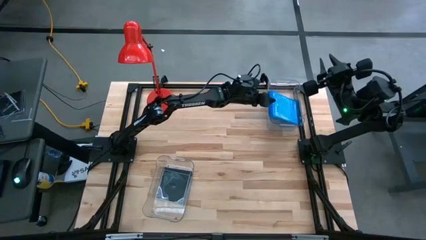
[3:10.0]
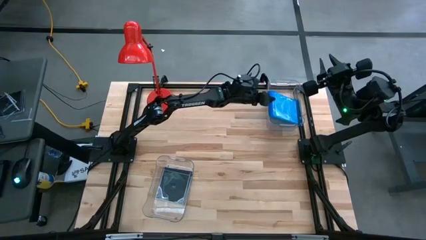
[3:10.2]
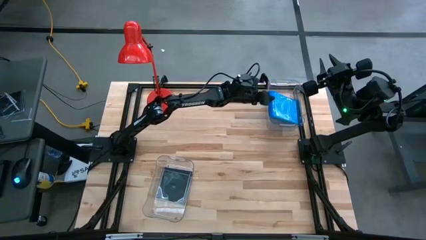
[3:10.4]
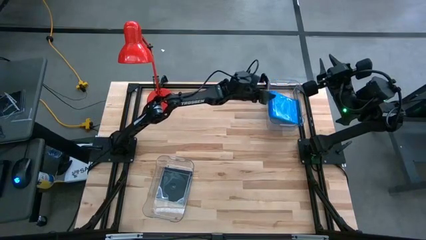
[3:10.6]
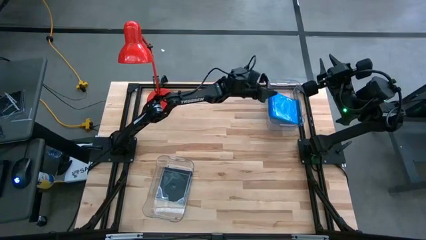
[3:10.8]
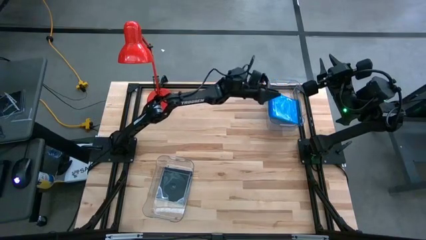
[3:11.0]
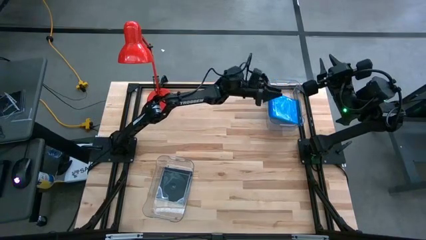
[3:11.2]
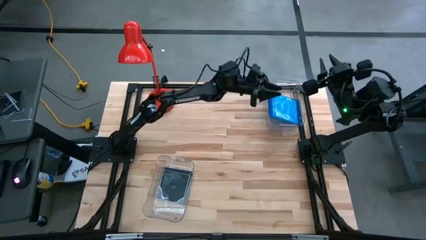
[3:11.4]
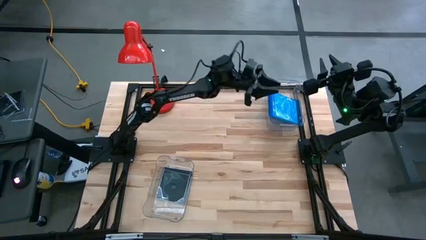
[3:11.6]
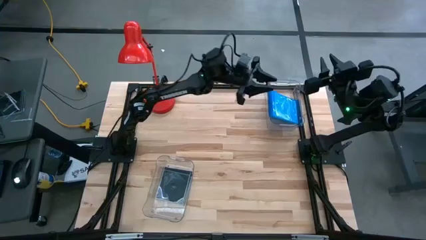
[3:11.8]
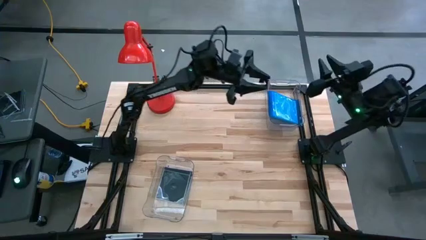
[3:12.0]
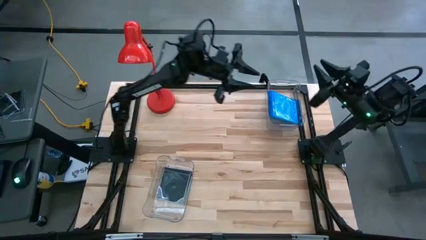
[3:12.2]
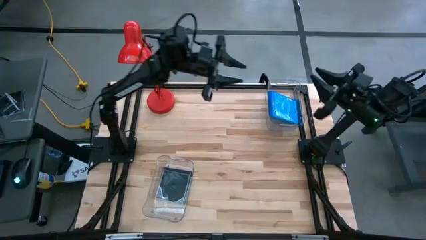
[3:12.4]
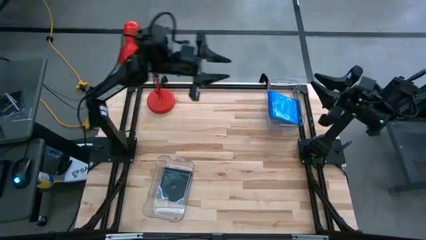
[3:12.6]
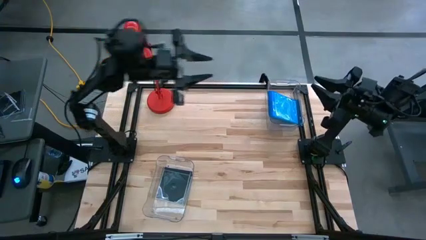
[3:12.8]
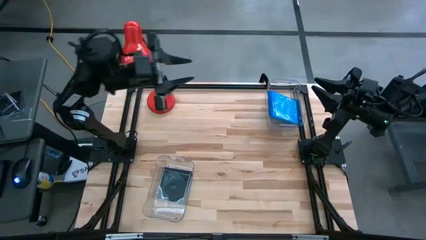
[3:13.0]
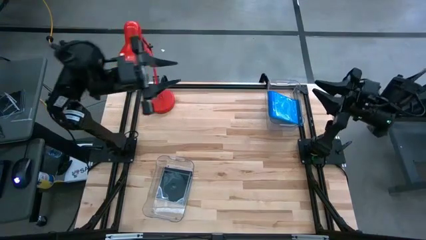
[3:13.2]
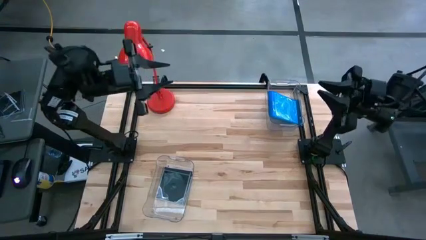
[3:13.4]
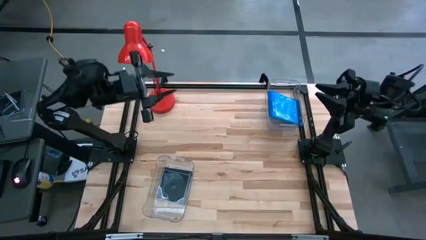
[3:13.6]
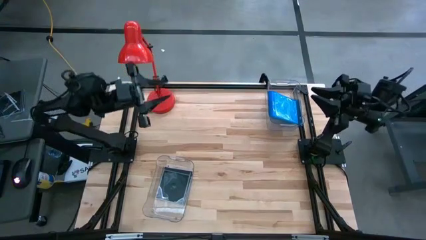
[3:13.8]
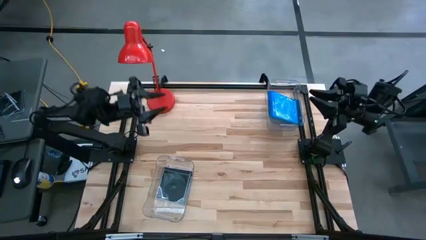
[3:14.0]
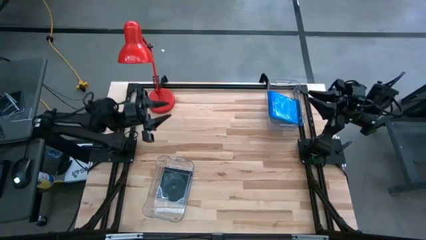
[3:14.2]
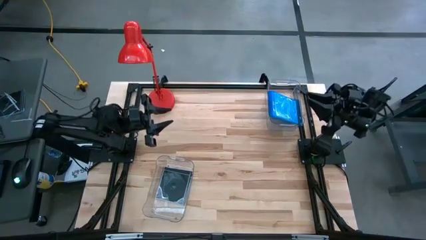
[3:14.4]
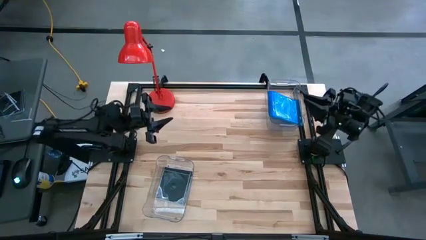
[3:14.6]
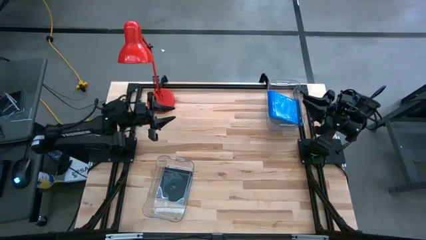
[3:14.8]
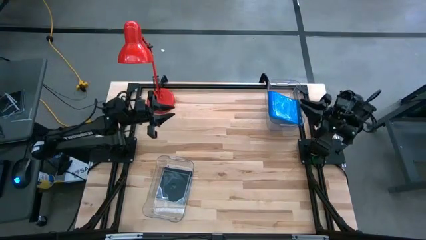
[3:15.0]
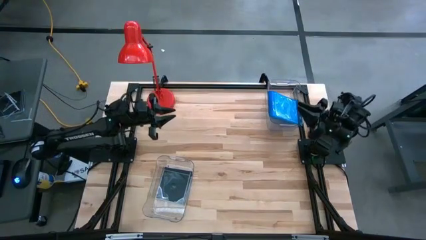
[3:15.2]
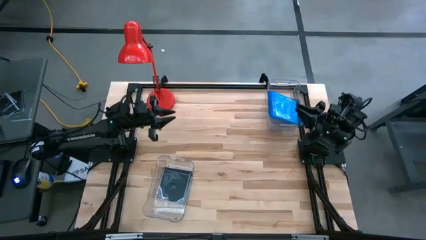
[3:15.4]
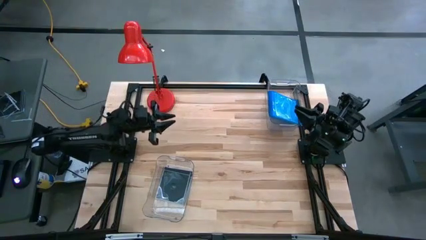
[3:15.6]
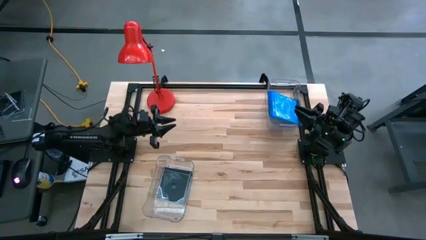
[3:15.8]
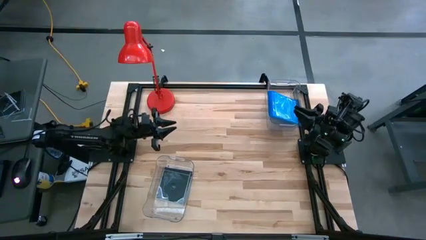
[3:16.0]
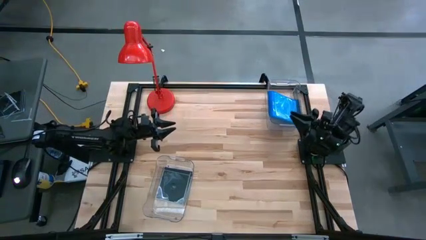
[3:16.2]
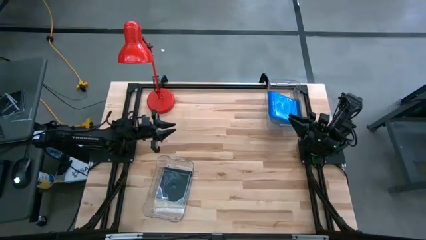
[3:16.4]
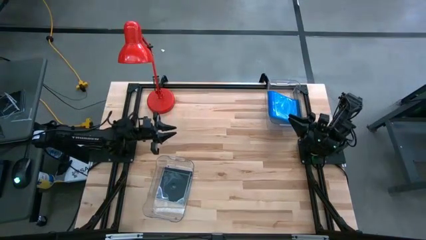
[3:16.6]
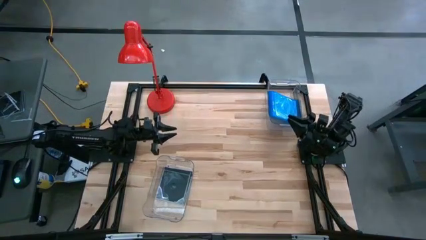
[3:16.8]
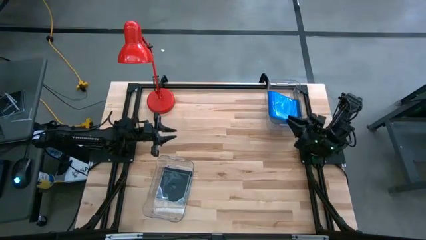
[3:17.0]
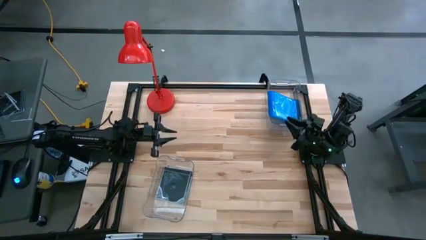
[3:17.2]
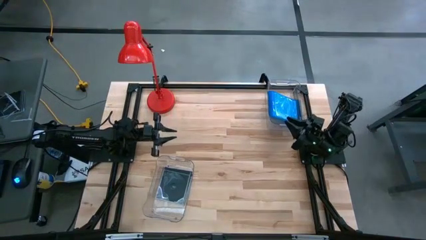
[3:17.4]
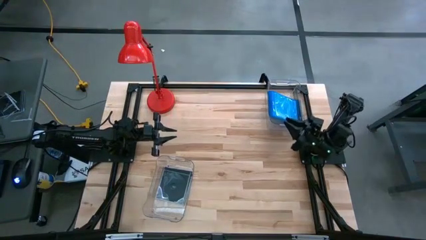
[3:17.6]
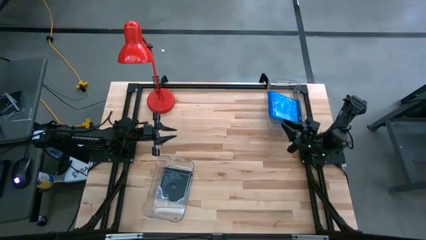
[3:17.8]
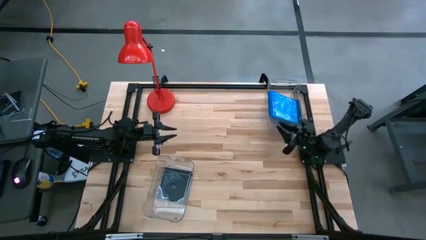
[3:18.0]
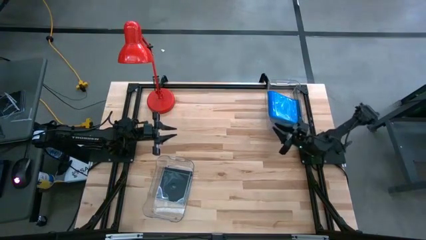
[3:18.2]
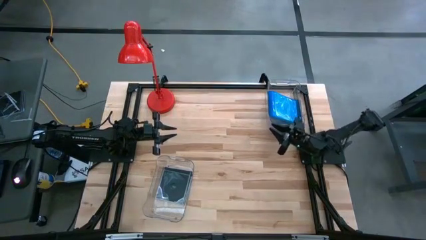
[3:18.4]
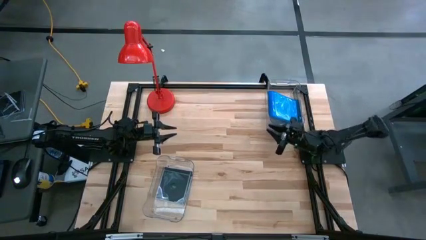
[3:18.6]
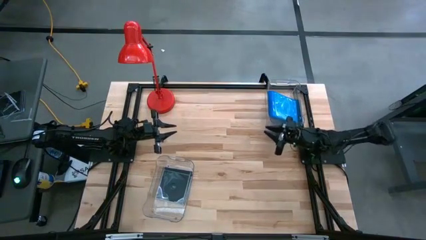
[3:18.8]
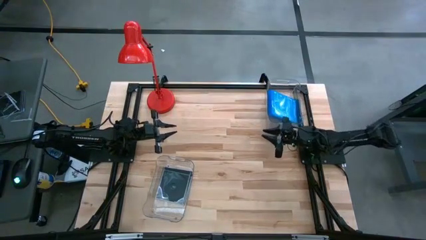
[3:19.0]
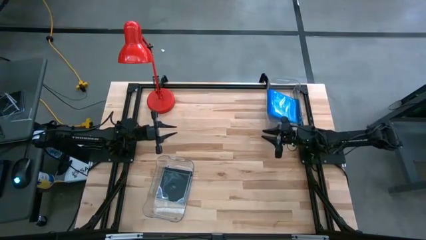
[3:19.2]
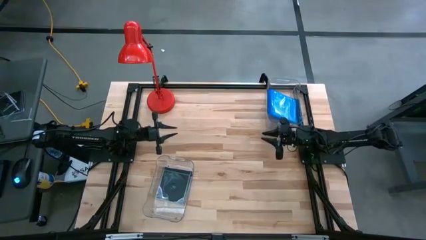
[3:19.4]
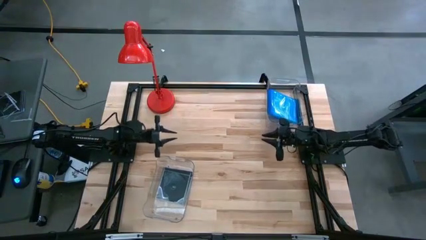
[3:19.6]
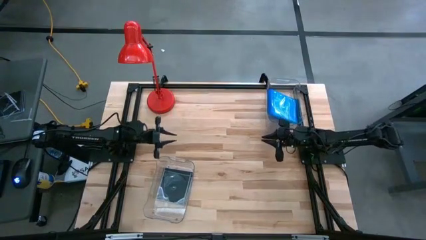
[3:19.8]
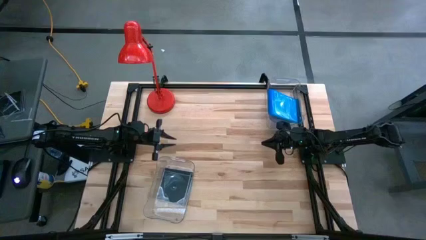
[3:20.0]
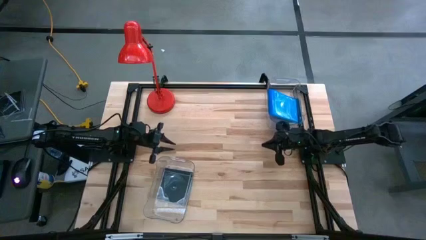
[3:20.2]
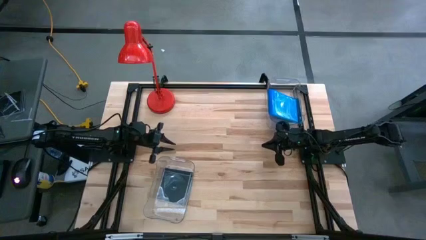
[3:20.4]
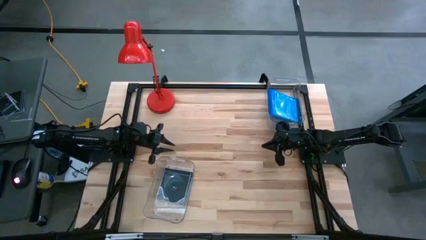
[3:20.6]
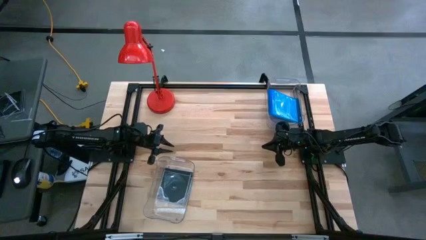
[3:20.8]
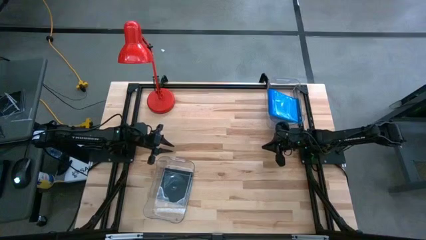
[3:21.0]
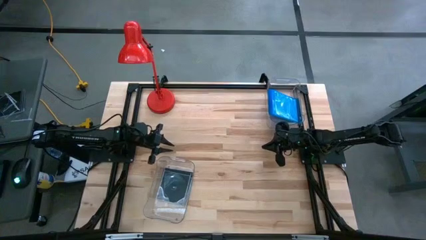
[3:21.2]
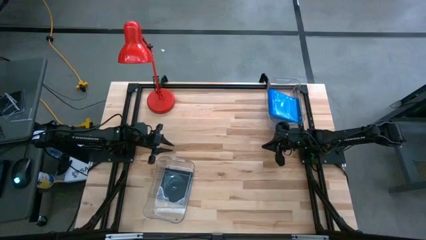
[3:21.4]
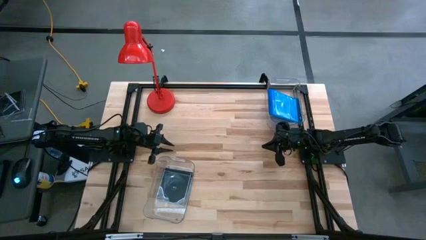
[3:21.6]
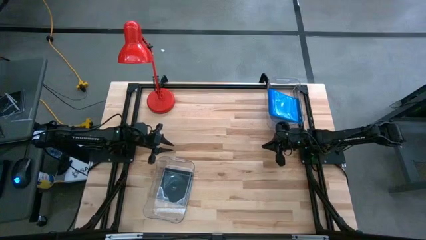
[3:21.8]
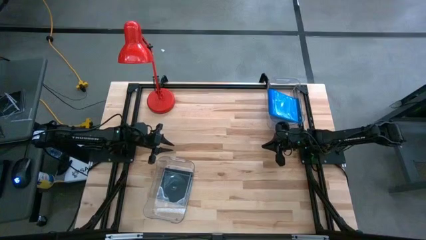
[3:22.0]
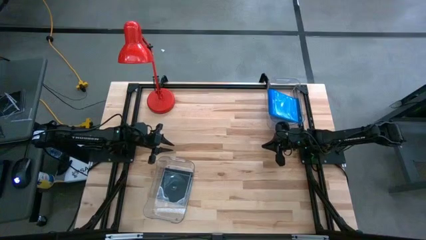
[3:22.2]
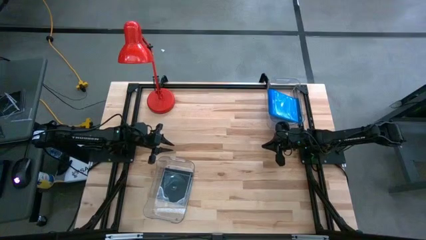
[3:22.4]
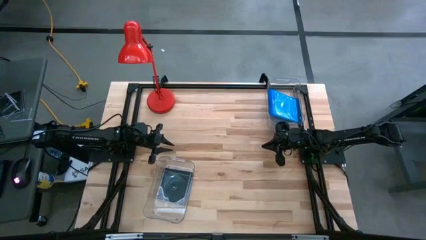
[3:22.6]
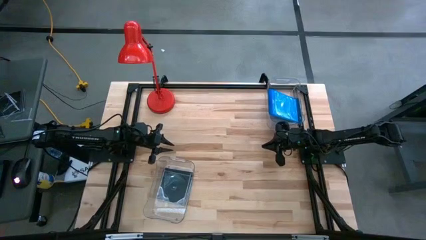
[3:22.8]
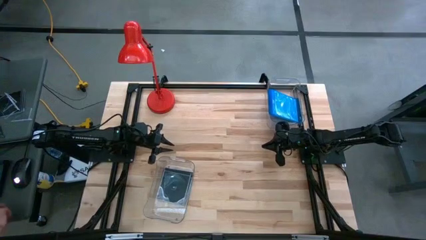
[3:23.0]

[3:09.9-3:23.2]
Task: Pick & place jewel cases by type
Return to Home Position
